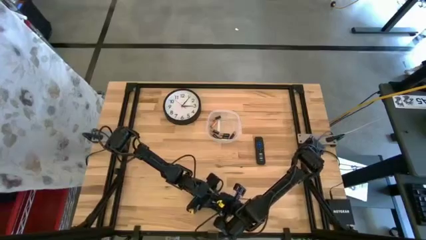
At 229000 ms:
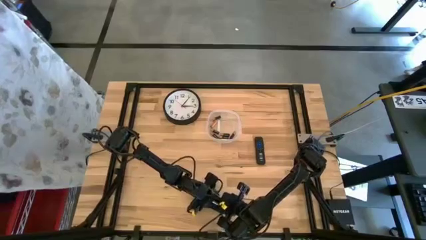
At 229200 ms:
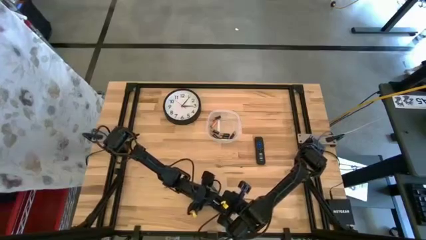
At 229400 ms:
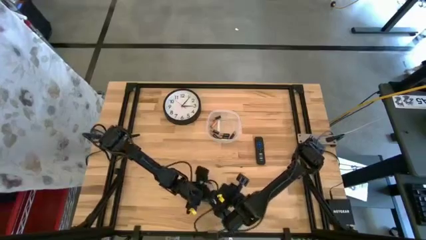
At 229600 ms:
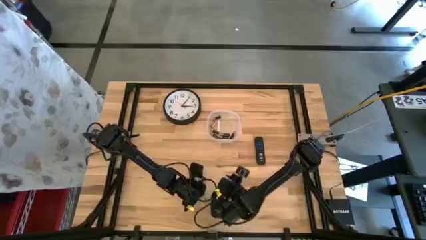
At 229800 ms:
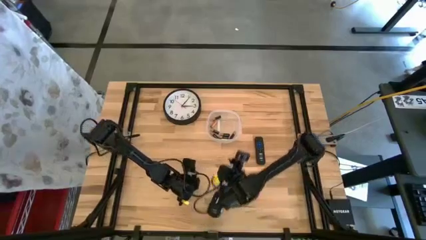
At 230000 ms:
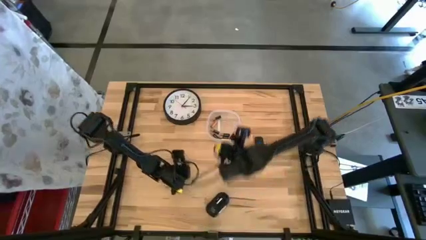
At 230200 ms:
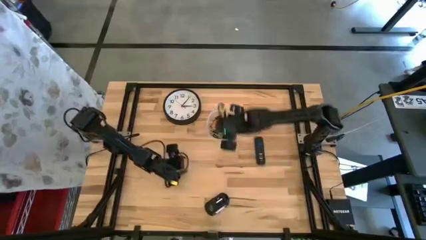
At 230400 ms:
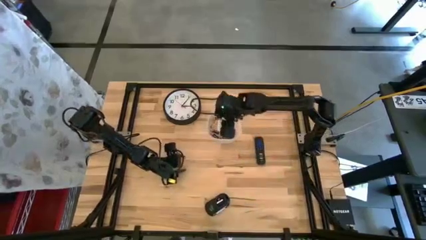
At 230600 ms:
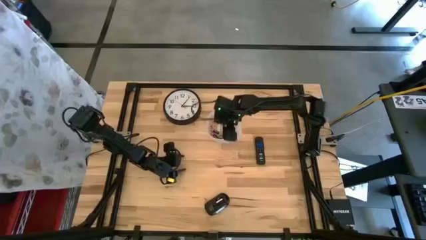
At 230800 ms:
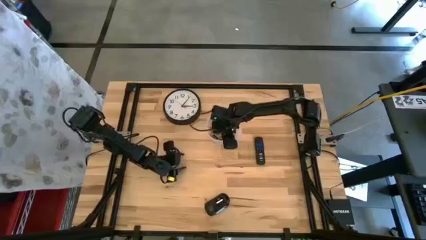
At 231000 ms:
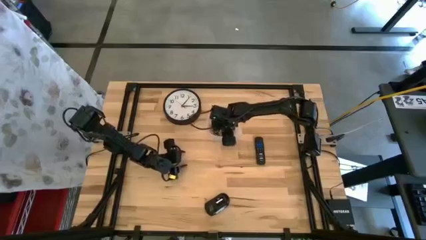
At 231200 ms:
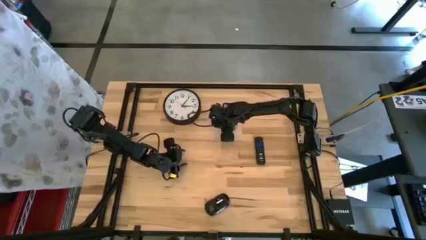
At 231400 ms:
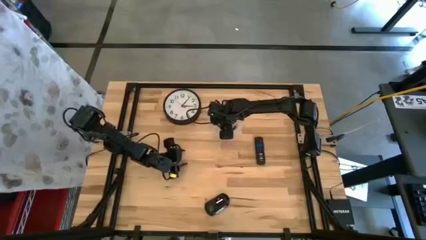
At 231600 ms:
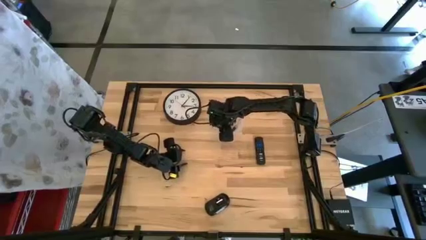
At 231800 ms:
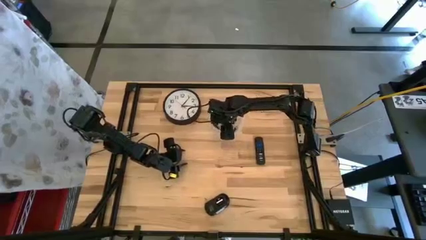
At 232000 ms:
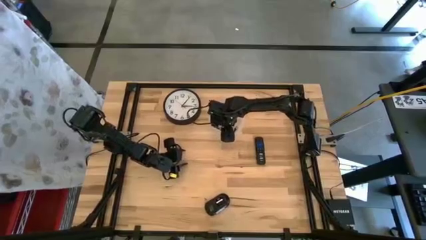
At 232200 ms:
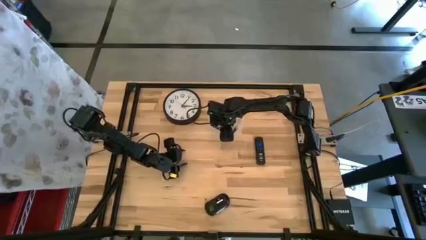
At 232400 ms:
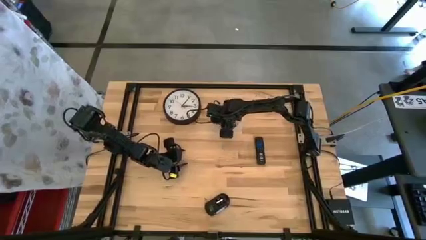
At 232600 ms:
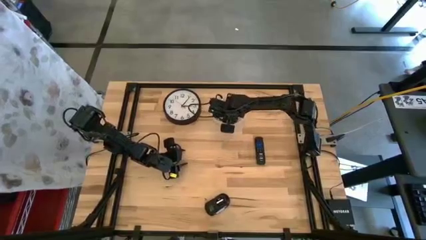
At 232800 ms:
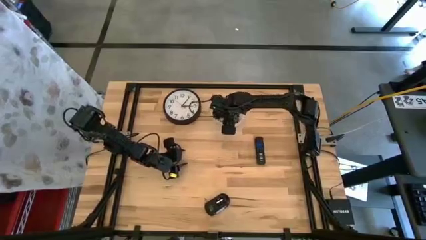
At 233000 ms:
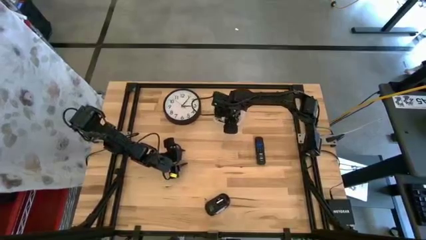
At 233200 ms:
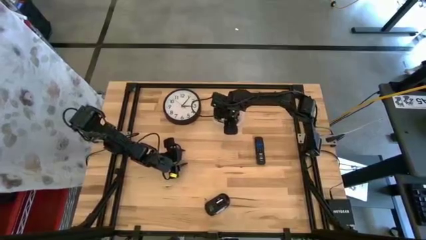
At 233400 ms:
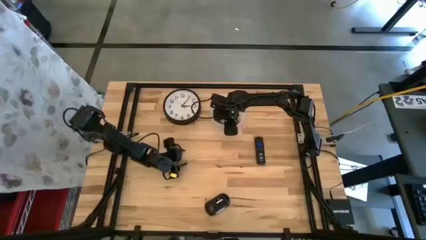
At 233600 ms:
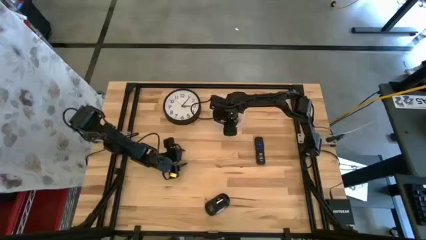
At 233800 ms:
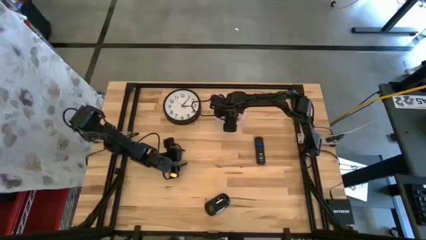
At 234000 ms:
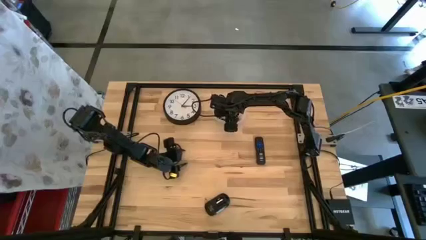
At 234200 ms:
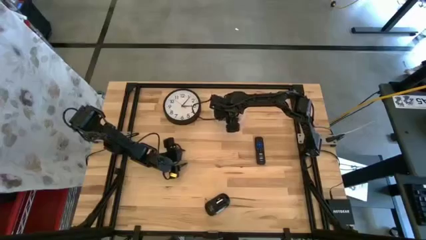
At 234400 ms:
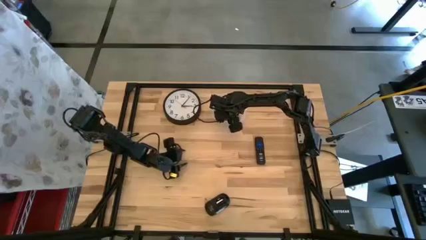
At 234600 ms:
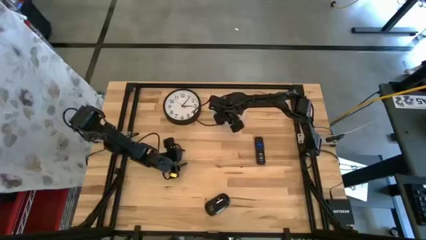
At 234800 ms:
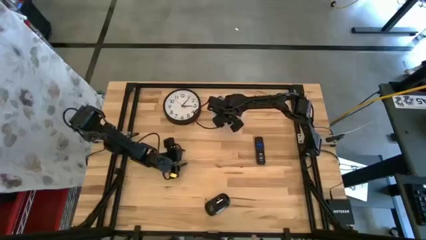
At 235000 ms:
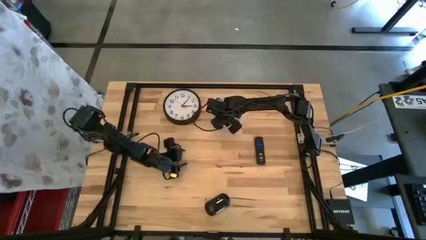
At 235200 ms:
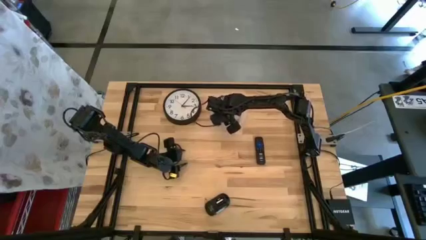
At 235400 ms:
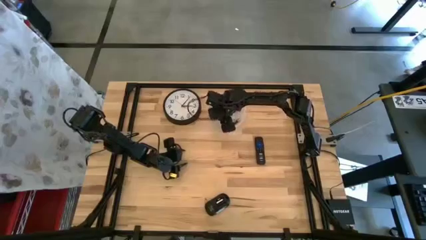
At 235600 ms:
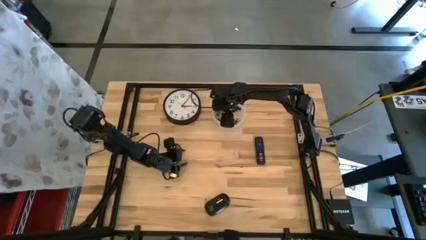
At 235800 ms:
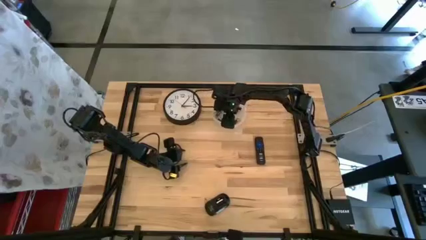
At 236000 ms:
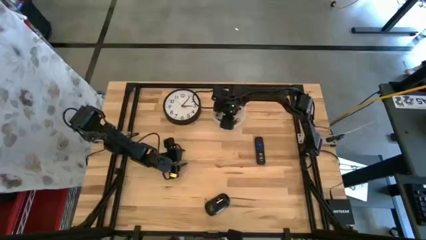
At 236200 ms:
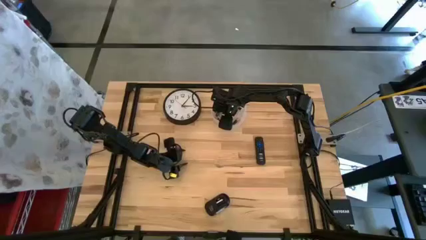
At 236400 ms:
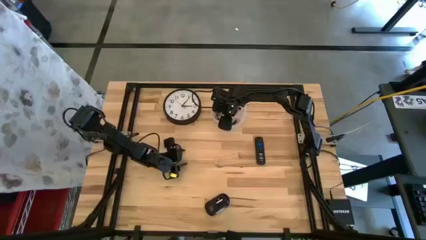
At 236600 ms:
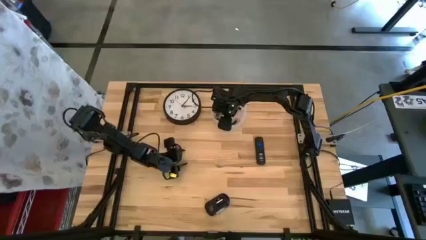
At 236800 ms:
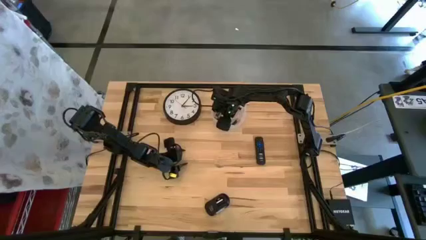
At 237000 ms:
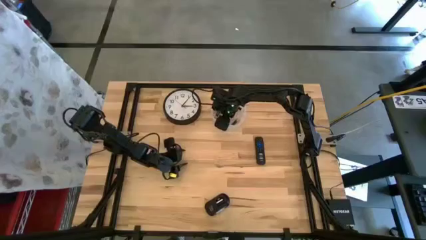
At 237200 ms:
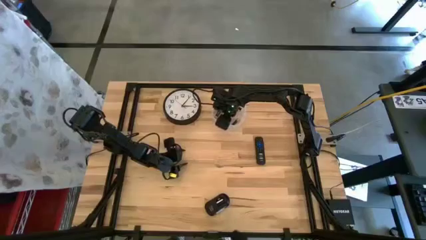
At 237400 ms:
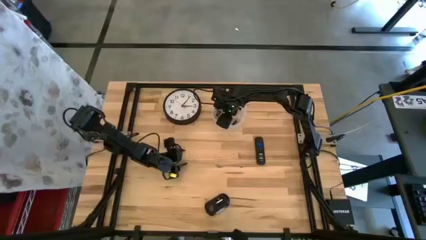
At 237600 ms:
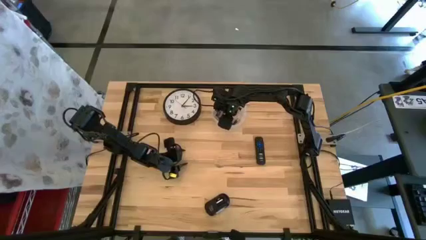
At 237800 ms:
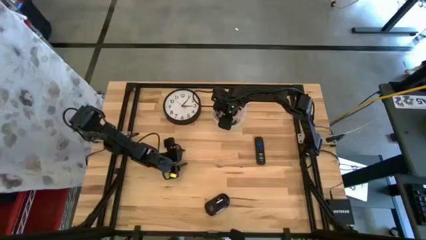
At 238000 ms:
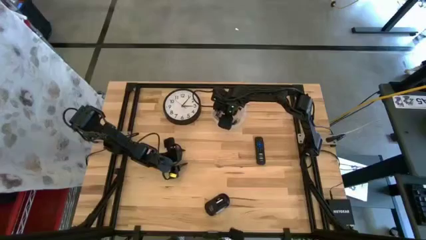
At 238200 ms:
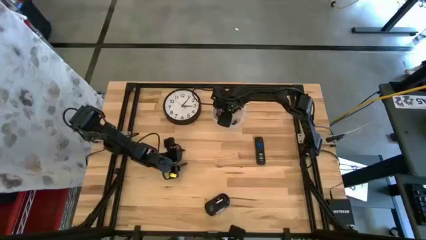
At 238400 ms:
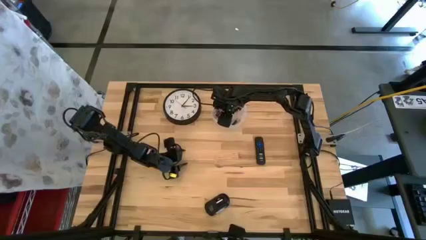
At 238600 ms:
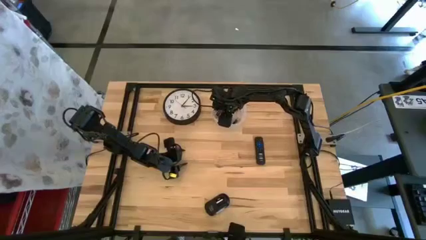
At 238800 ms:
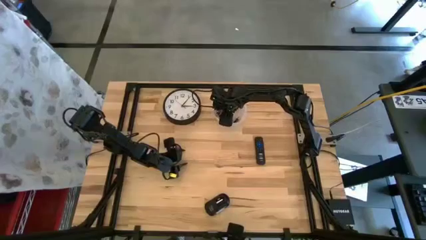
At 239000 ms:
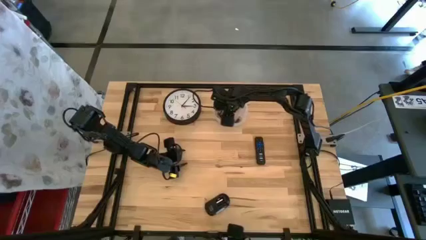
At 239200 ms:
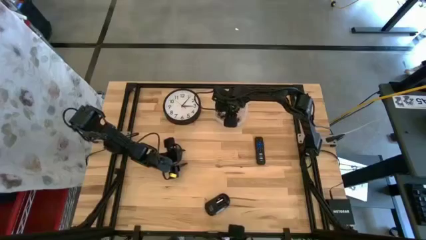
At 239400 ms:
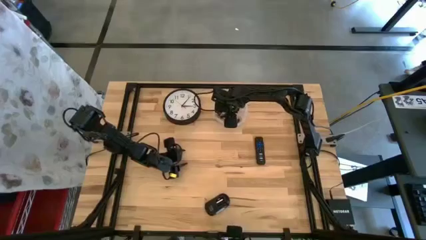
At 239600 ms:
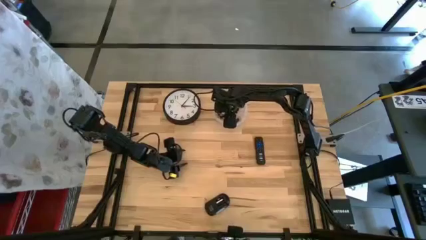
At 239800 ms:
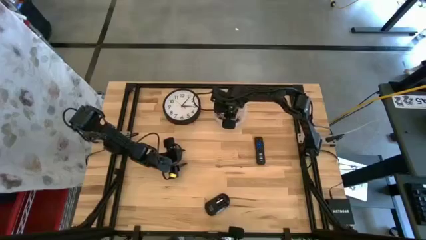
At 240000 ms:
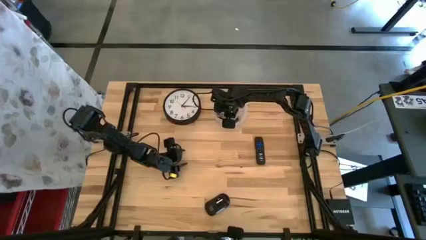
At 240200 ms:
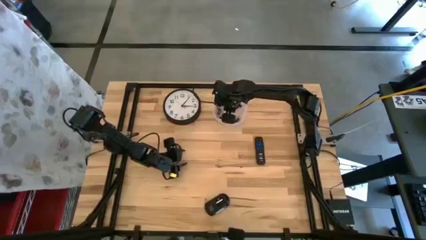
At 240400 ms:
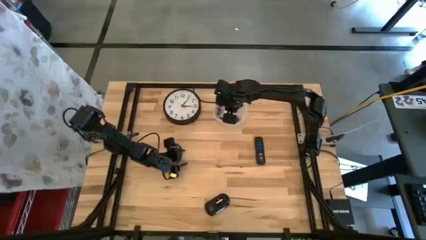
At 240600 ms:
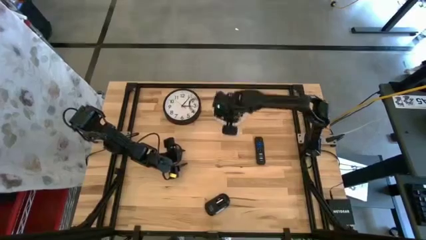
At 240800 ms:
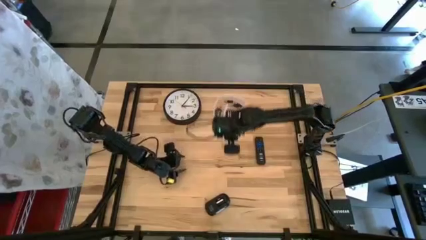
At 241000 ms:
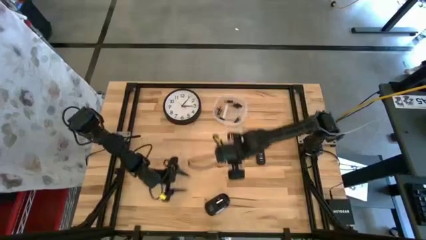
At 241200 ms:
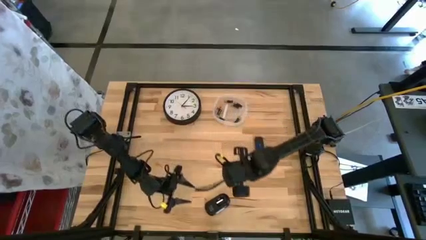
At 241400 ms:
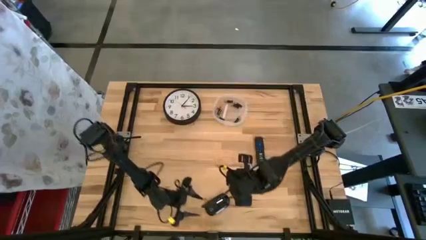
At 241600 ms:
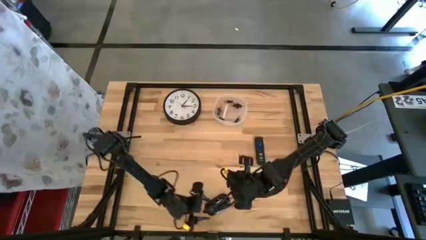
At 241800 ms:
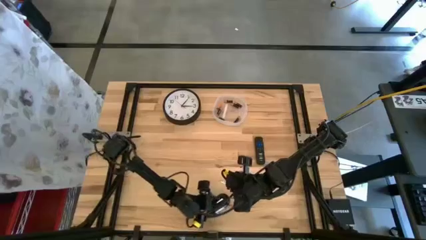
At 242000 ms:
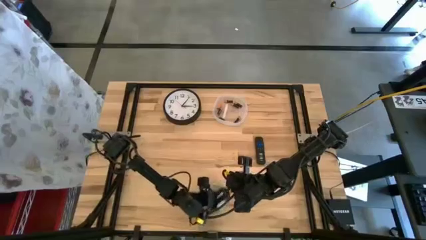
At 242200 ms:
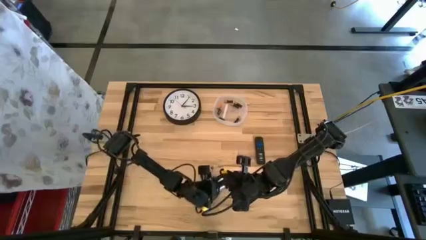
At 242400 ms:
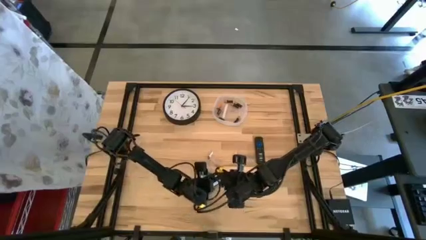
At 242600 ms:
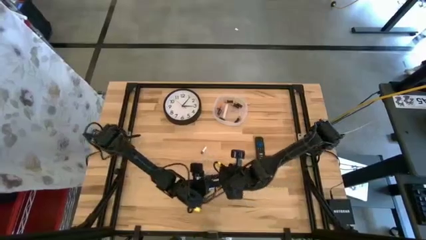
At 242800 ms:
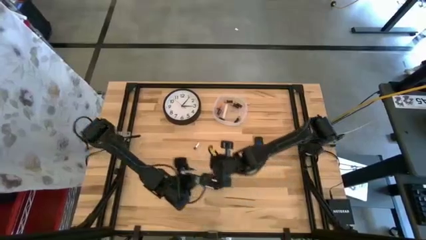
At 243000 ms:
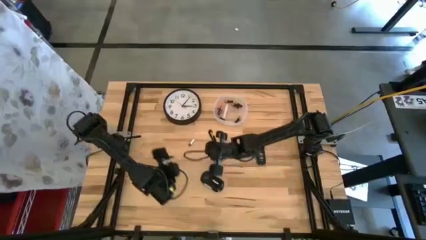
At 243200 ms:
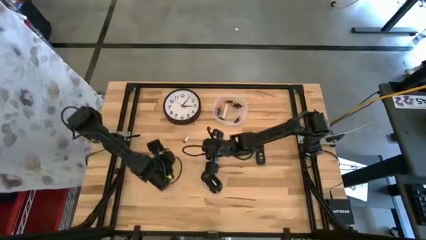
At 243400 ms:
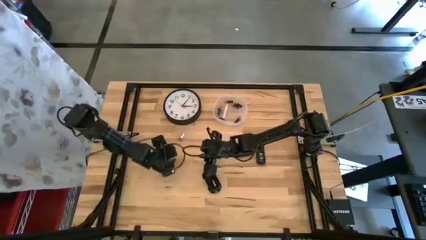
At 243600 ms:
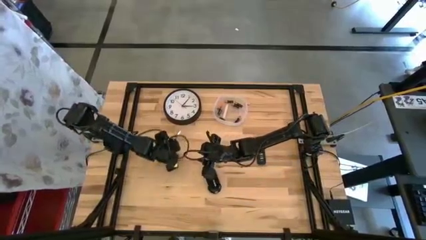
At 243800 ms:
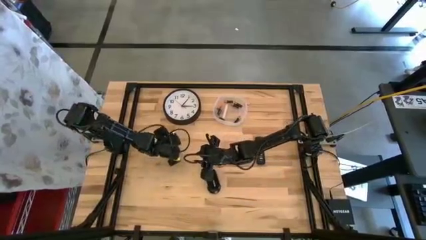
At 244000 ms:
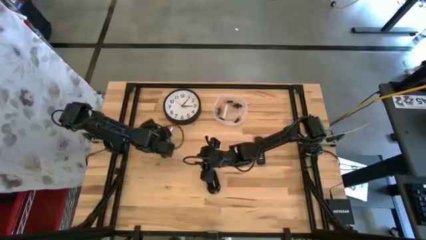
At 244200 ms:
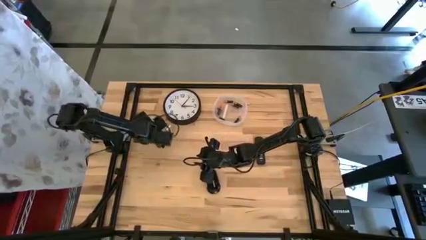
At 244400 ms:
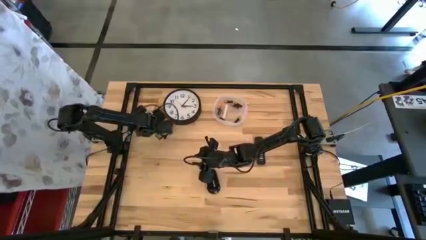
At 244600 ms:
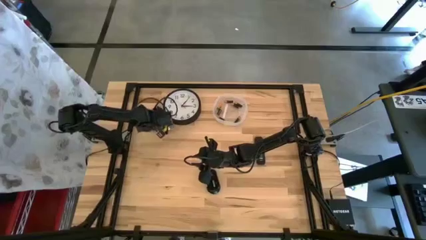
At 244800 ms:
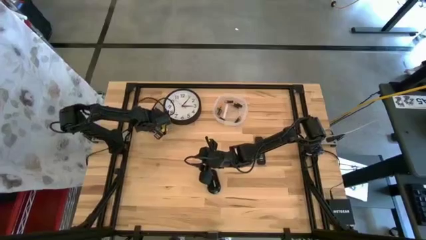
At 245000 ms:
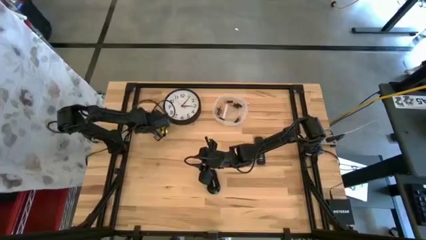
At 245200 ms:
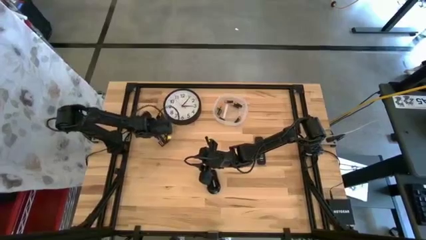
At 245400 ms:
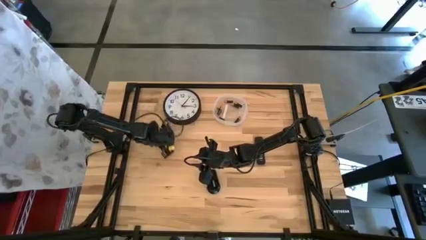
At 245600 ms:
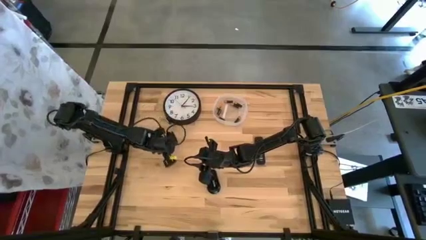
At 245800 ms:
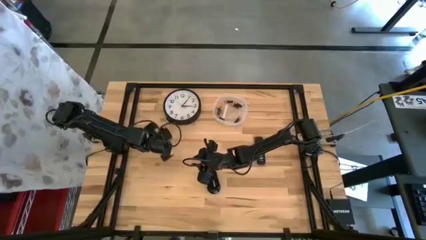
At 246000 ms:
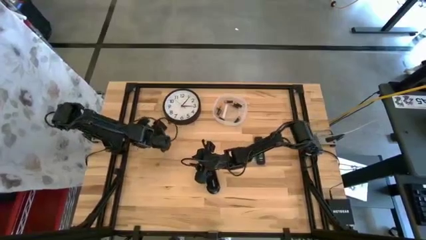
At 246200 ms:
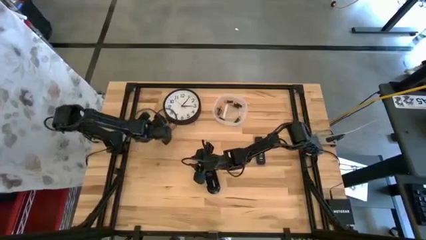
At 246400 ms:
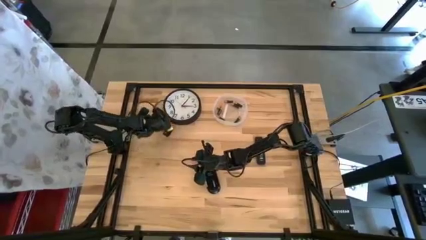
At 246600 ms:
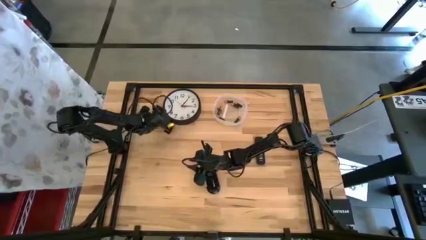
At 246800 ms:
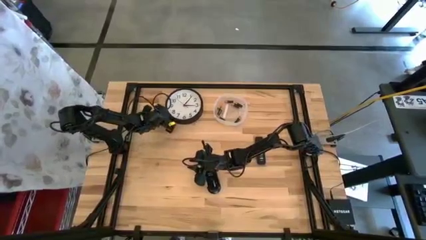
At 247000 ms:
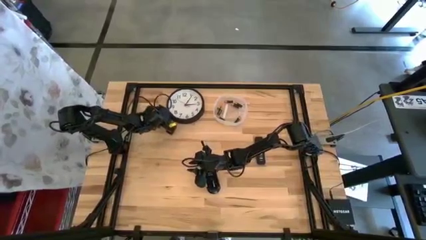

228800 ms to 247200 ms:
Task: Insert battery
Insert the silver battery into the computer mouse
